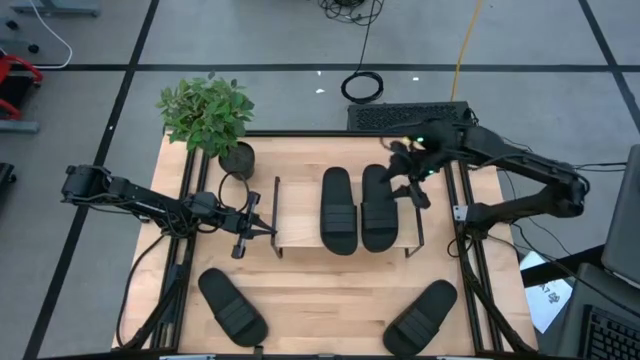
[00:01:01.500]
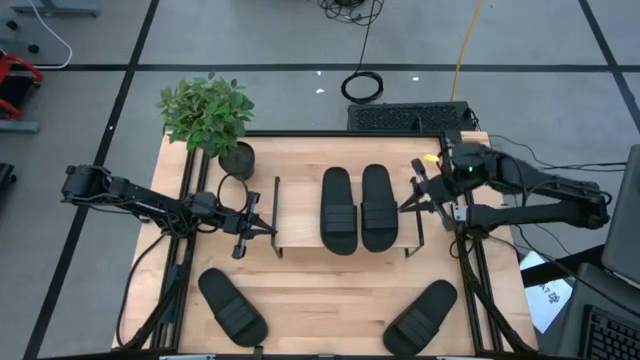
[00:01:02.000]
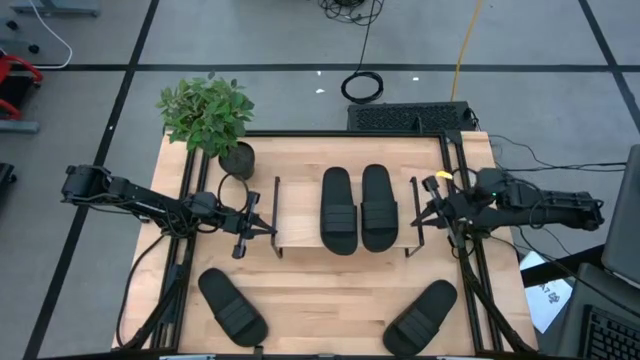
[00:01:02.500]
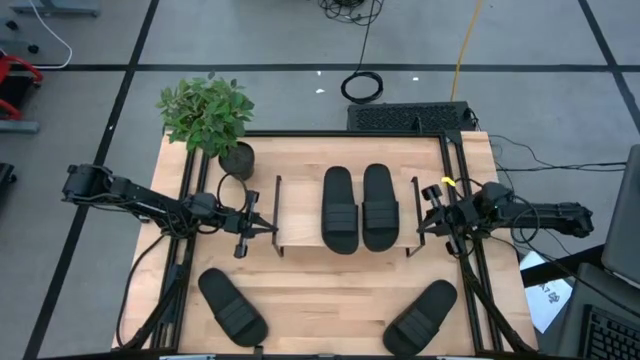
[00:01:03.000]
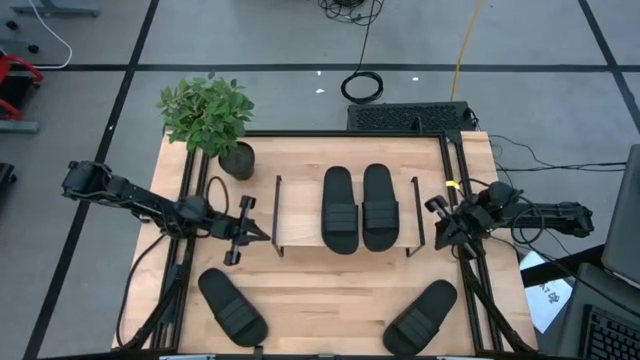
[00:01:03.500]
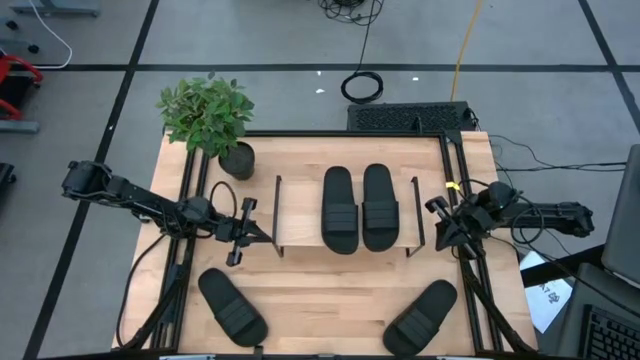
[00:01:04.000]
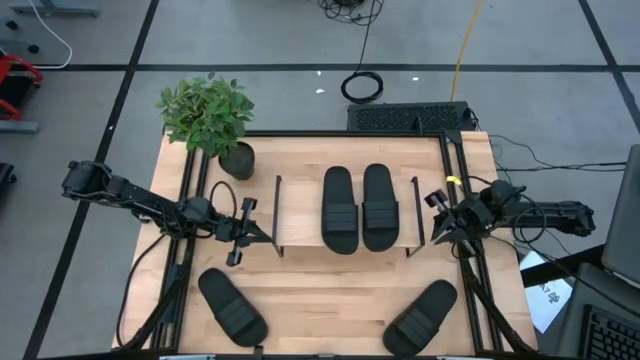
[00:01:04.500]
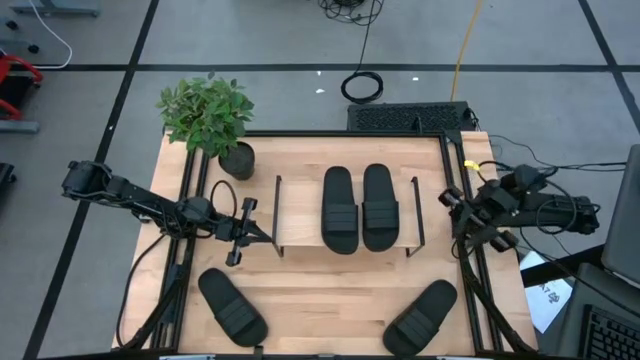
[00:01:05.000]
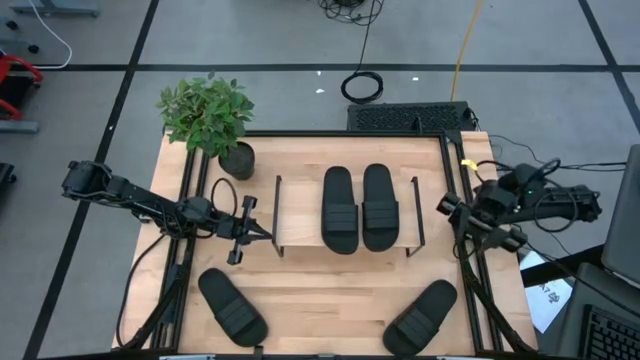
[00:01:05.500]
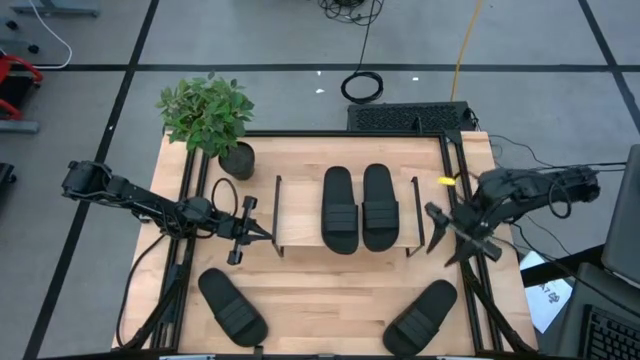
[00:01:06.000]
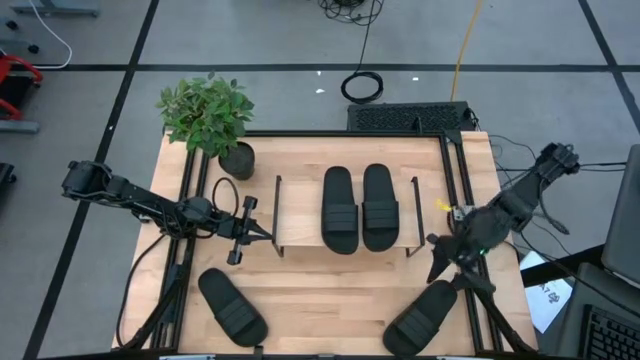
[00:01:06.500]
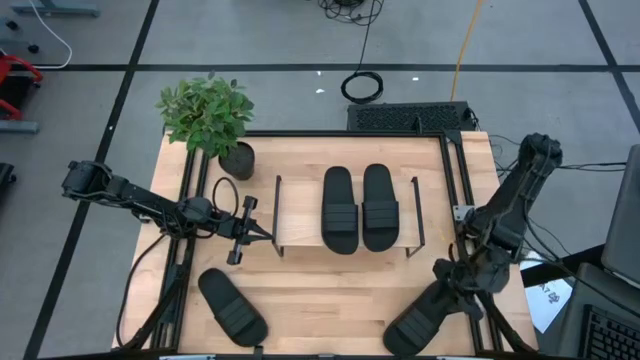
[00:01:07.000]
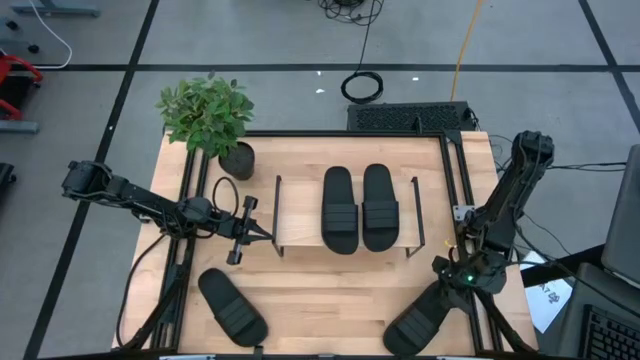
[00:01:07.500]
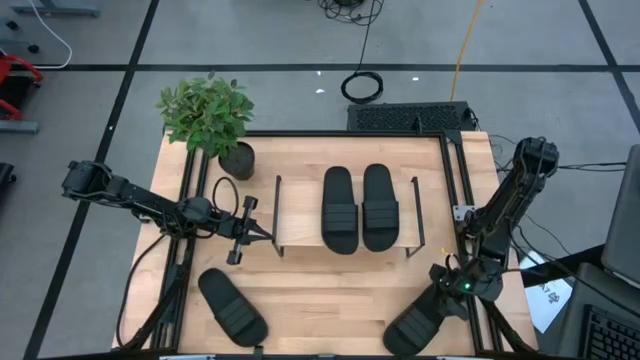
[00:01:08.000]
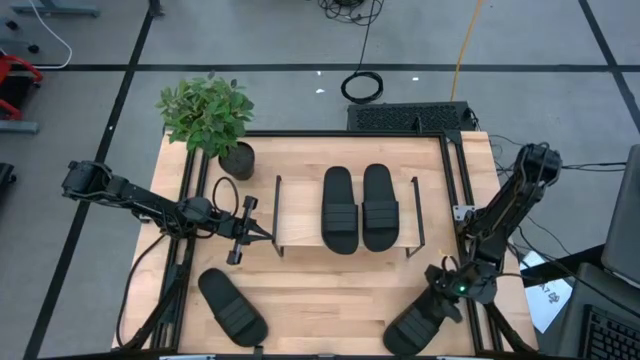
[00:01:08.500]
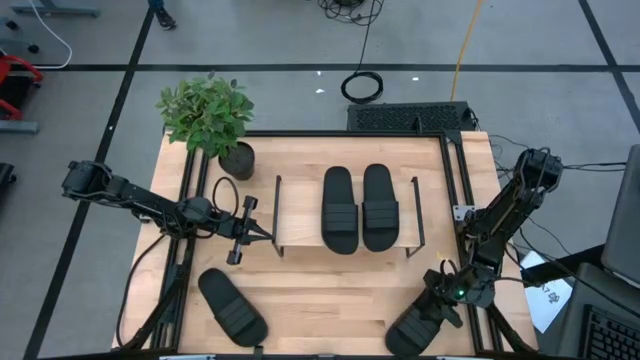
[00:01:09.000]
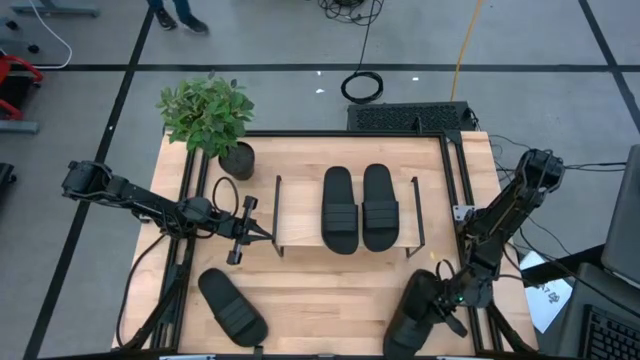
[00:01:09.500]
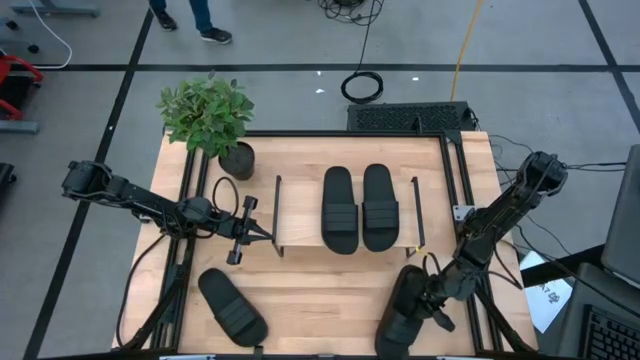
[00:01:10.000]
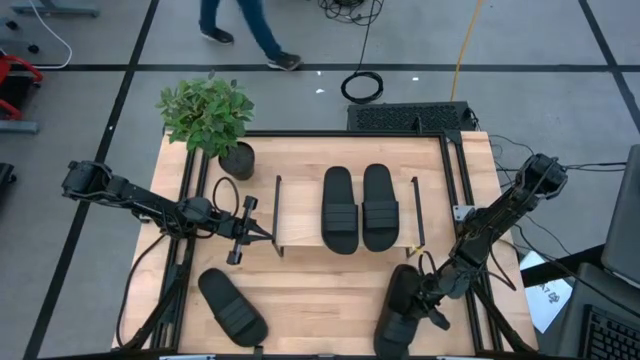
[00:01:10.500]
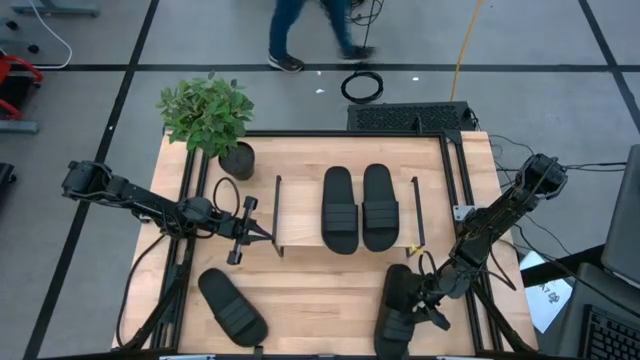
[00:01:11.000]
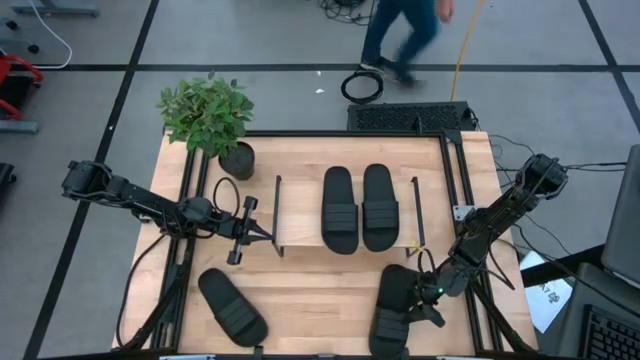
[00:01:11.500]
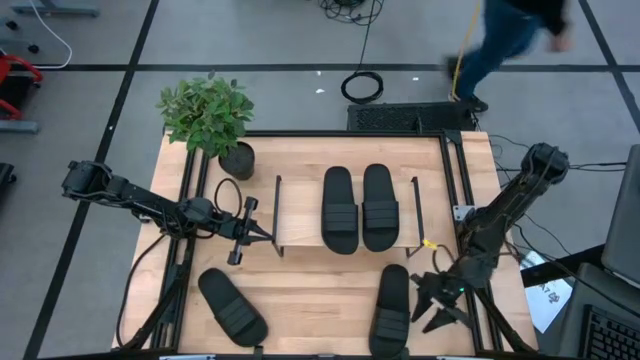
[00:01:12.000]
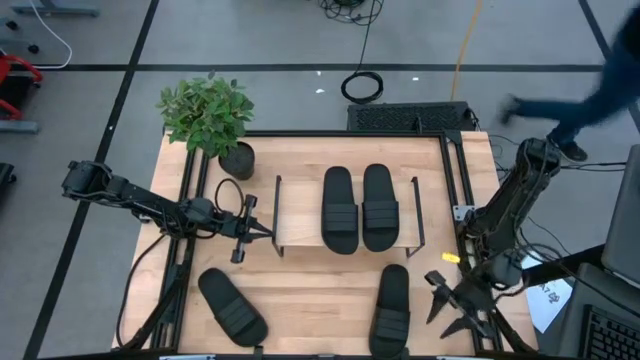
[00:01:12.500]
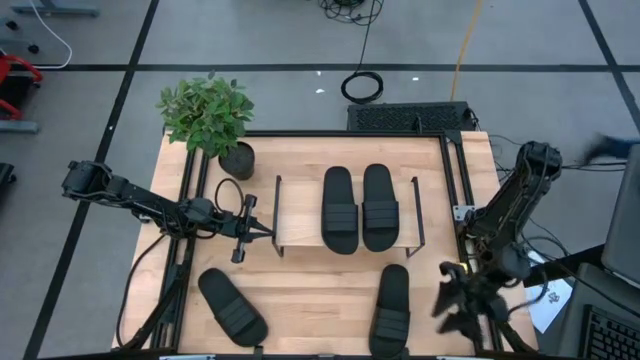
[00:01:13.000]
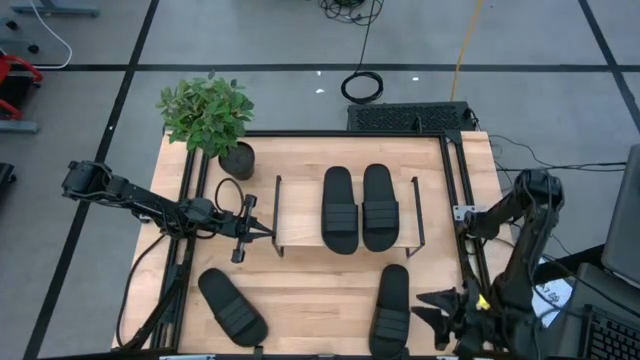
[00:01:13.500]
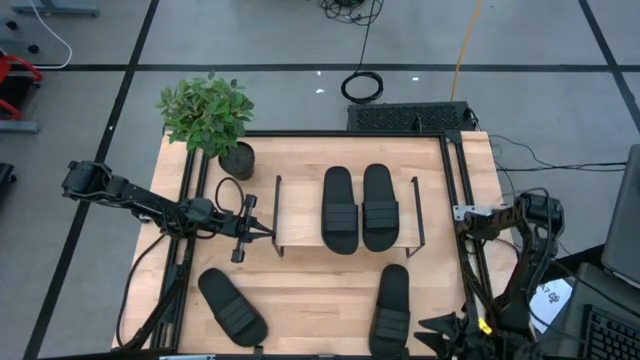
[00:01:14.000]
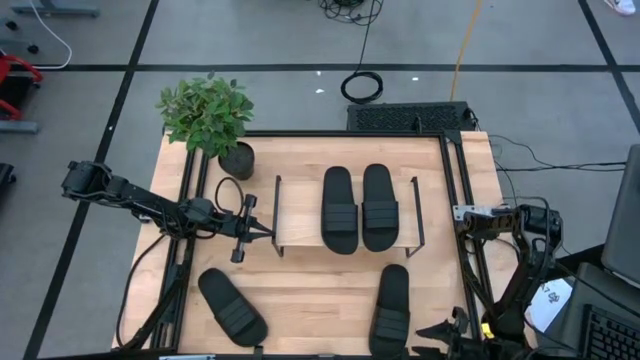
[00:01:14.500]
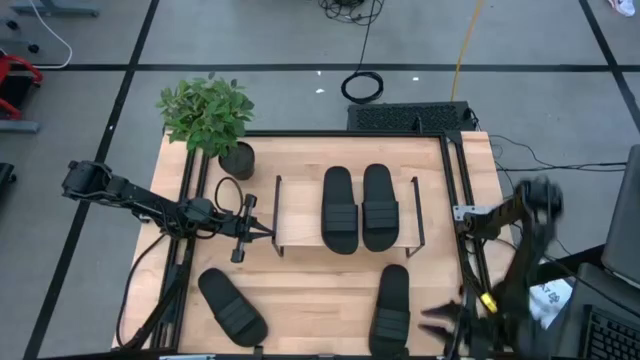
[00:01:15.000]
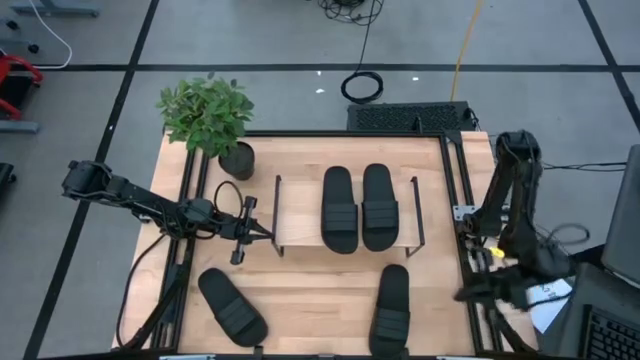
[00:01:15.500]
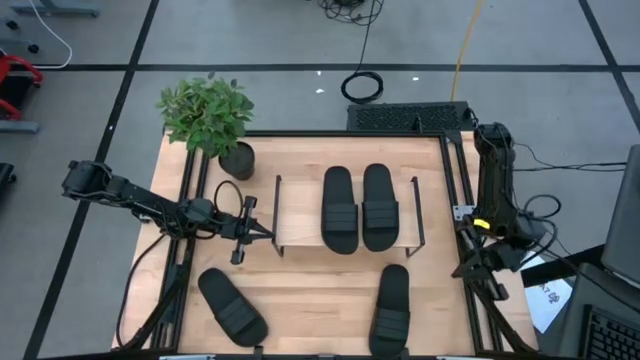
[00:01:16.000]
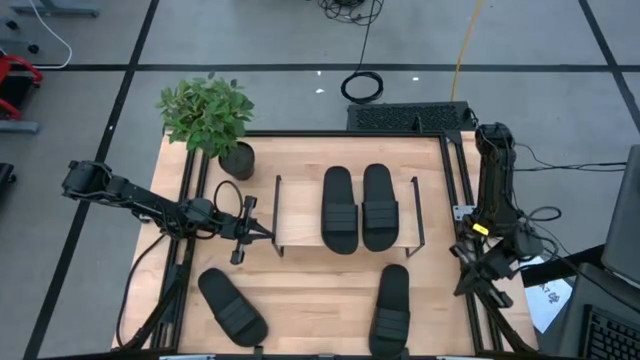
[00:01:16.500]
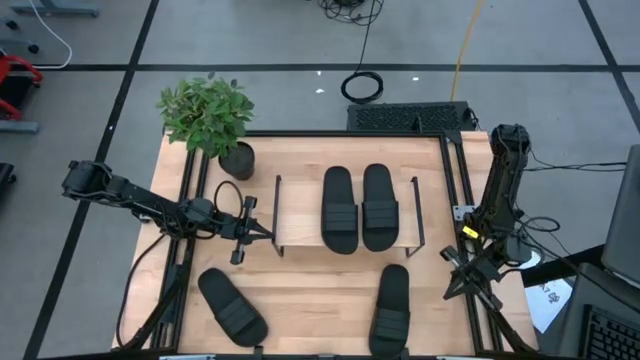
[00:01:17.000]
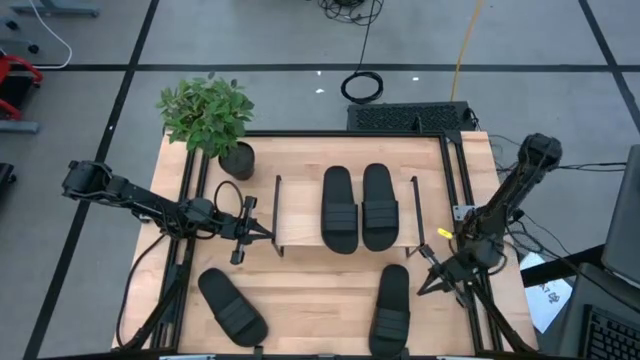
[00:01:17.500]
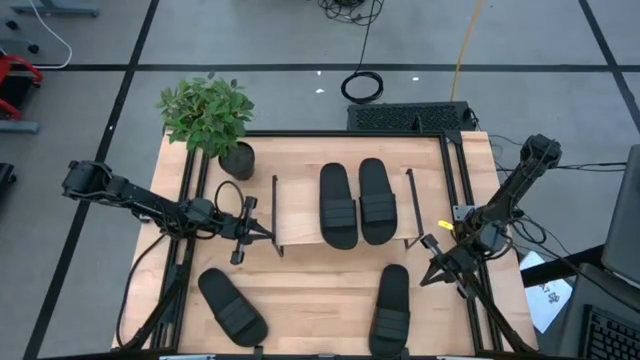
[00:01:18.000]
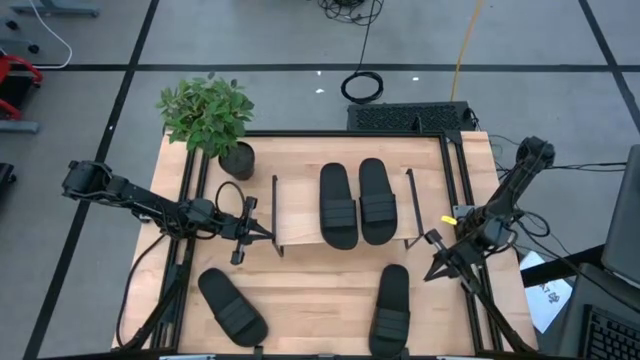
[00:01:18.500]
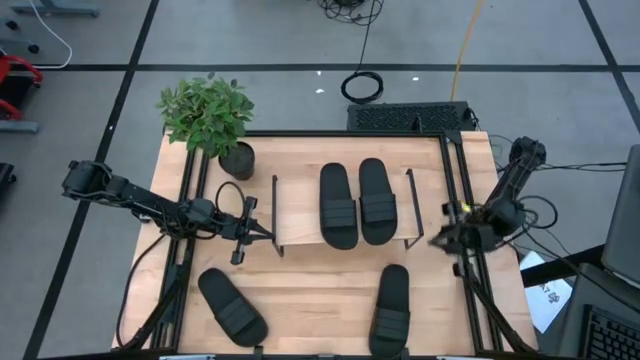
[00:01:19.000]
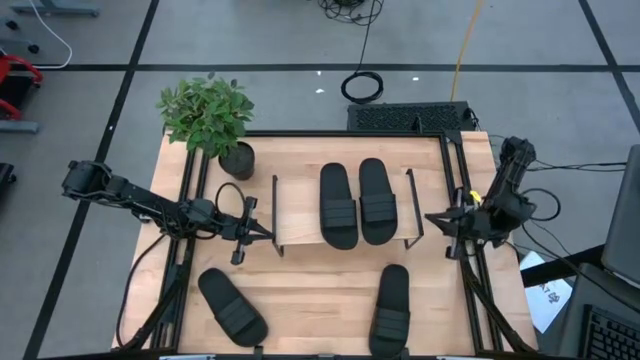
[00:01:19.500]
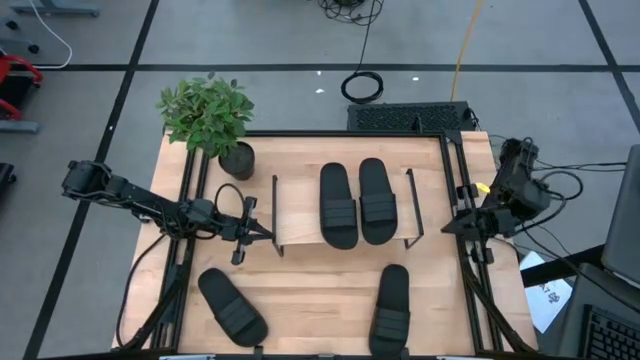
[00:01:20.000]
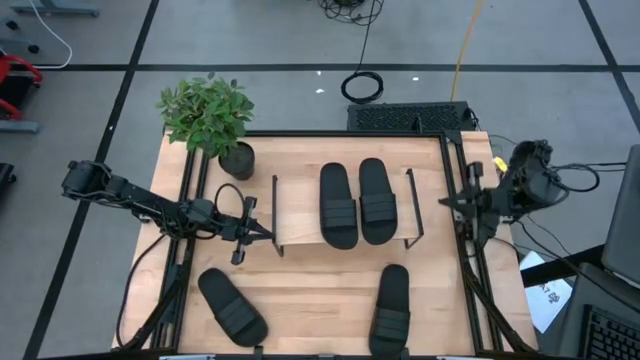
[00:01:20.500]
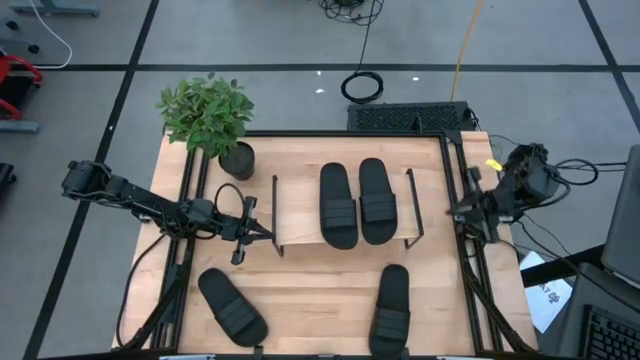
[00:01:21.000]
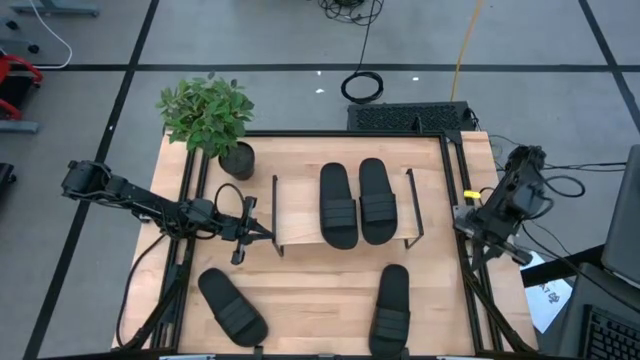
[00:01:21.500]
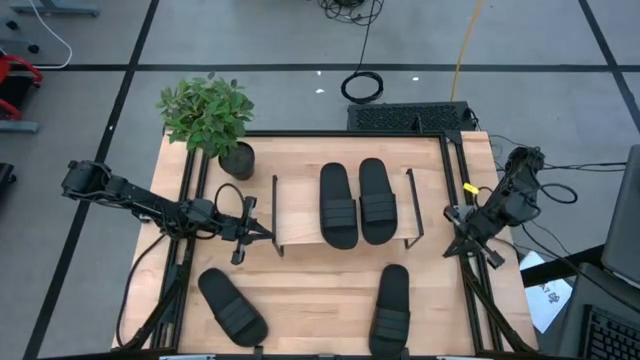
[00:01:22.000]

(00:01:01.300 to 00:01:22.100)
Task: Pick and place slides into the shelf
Put the black slide under the shelf
